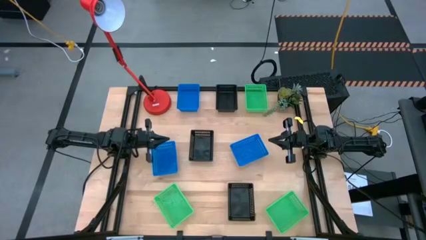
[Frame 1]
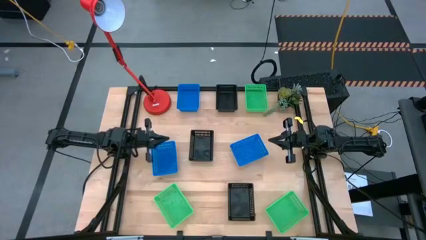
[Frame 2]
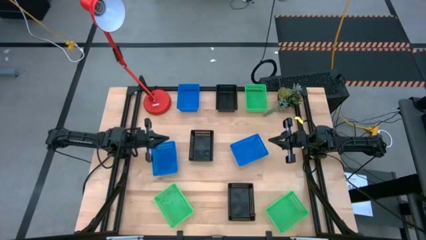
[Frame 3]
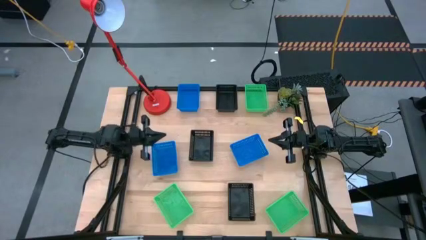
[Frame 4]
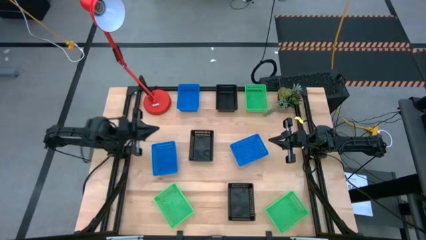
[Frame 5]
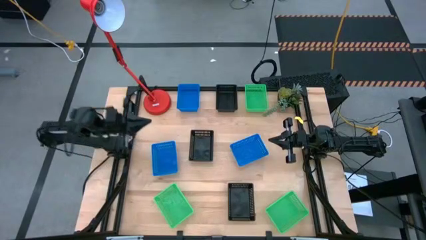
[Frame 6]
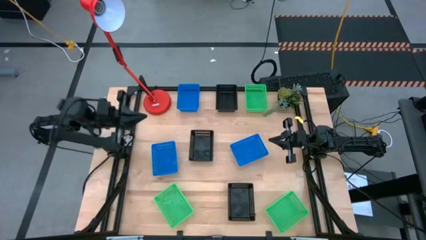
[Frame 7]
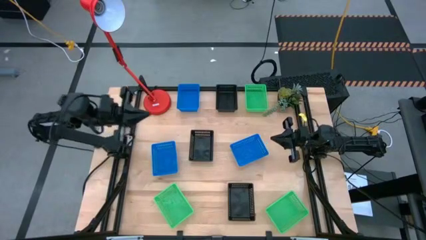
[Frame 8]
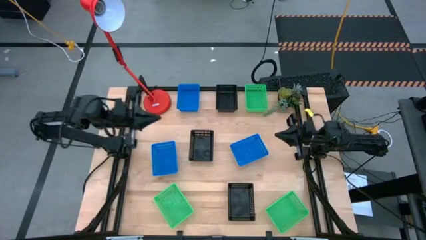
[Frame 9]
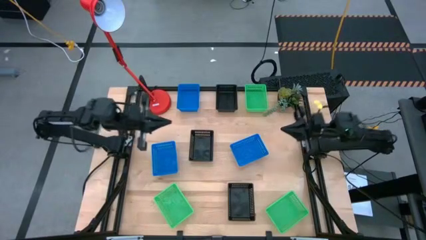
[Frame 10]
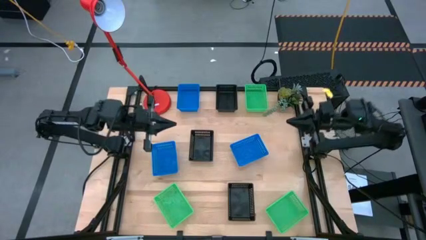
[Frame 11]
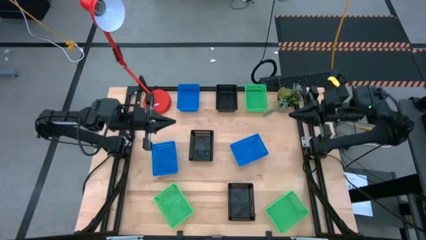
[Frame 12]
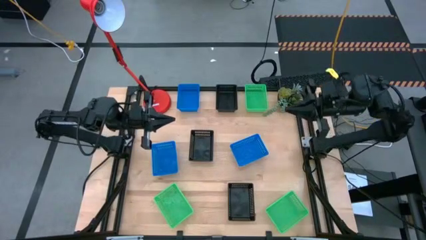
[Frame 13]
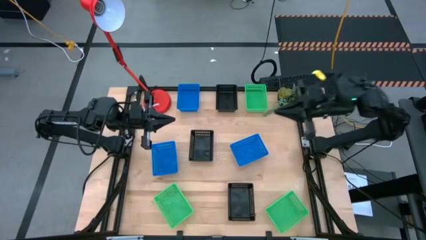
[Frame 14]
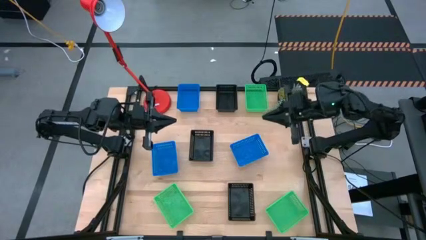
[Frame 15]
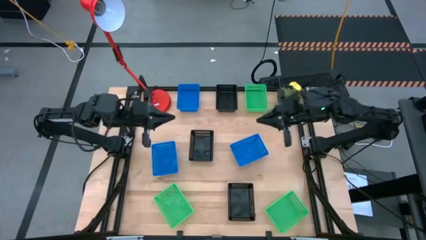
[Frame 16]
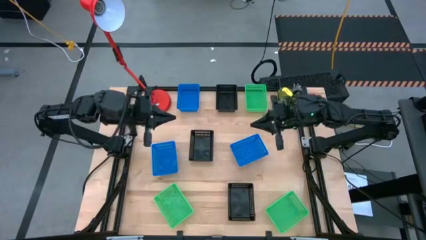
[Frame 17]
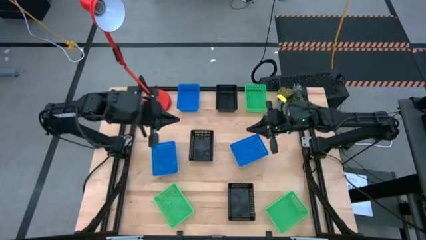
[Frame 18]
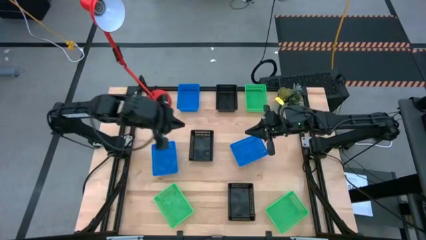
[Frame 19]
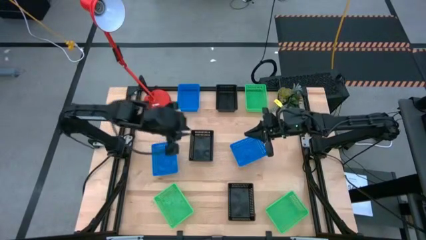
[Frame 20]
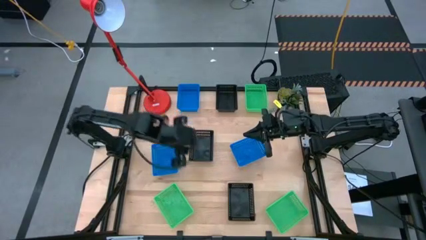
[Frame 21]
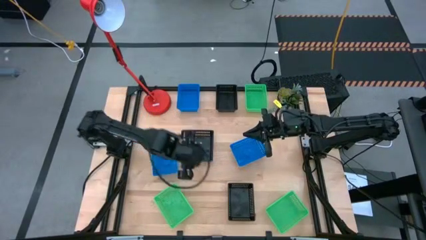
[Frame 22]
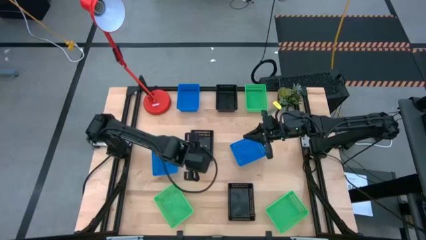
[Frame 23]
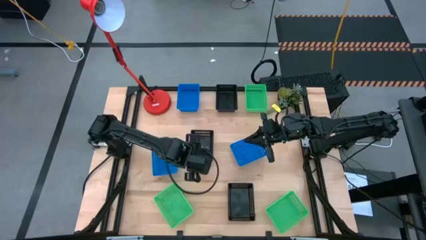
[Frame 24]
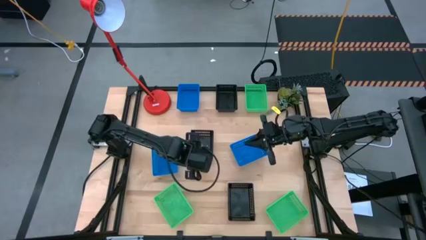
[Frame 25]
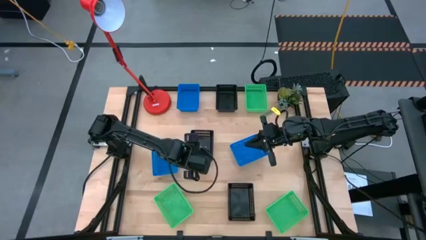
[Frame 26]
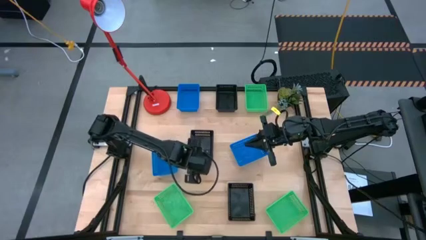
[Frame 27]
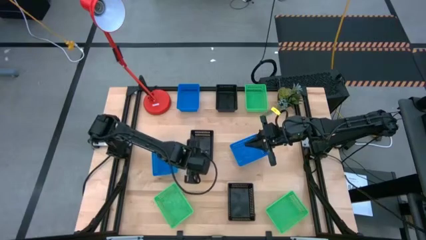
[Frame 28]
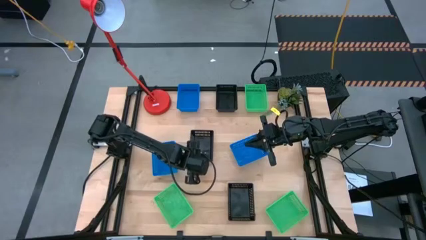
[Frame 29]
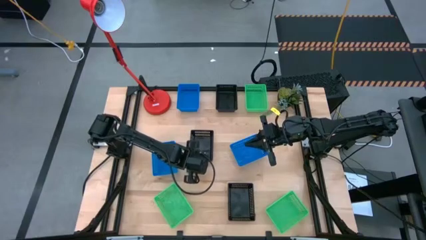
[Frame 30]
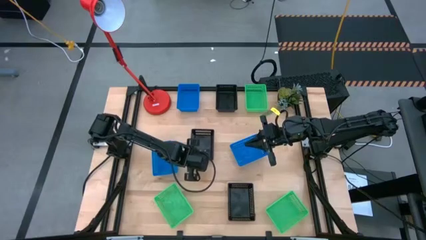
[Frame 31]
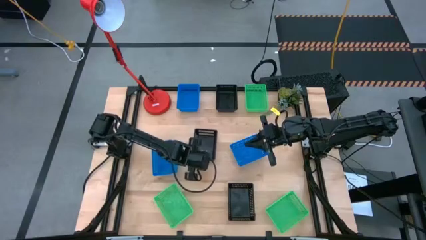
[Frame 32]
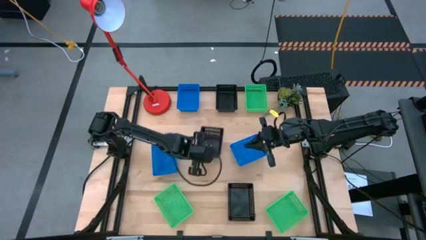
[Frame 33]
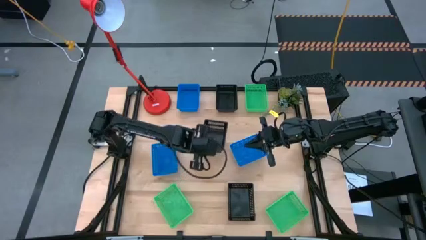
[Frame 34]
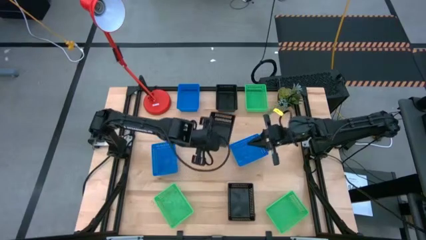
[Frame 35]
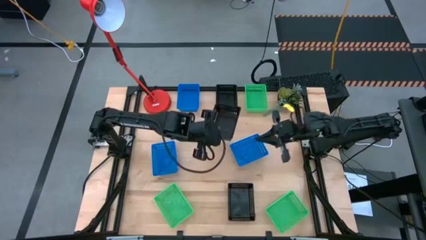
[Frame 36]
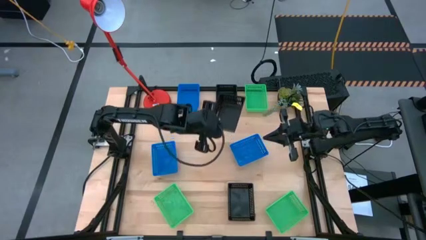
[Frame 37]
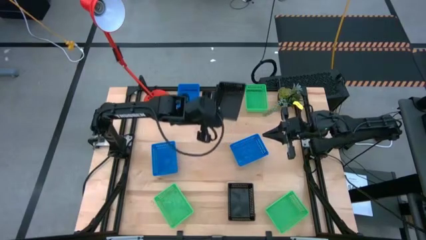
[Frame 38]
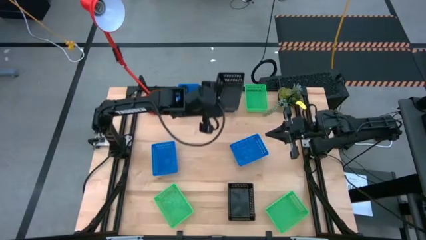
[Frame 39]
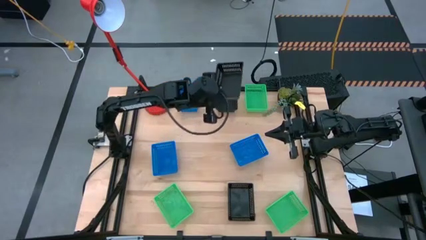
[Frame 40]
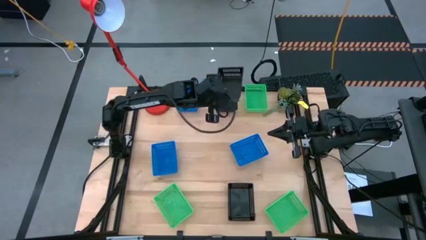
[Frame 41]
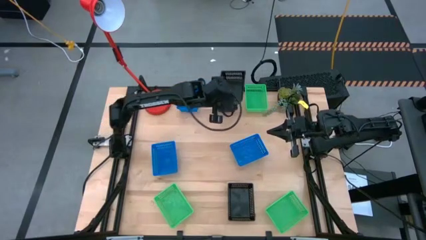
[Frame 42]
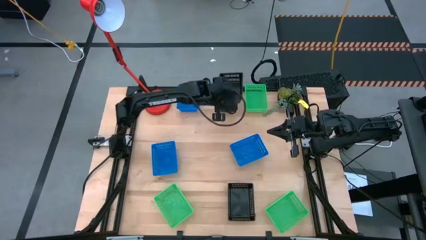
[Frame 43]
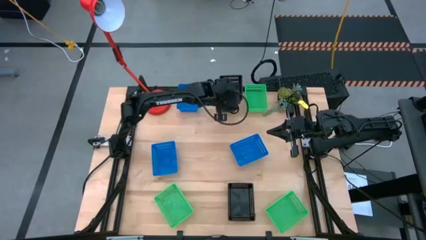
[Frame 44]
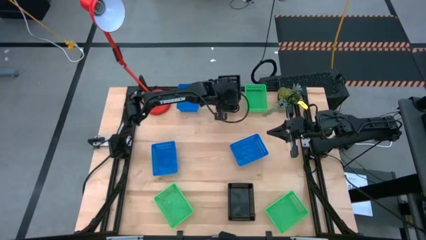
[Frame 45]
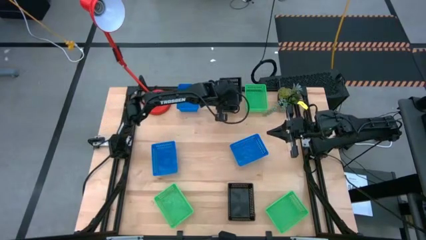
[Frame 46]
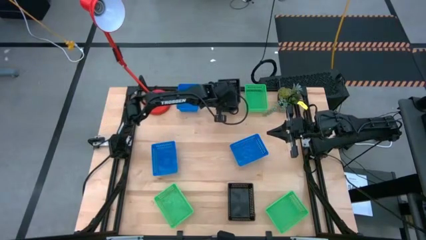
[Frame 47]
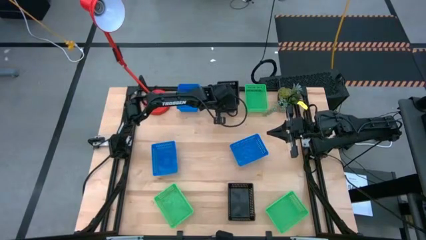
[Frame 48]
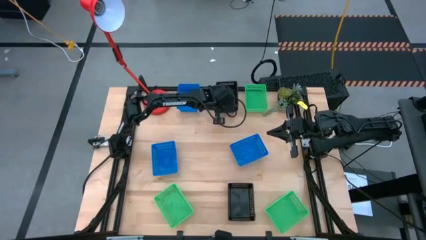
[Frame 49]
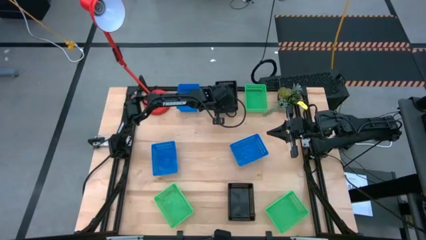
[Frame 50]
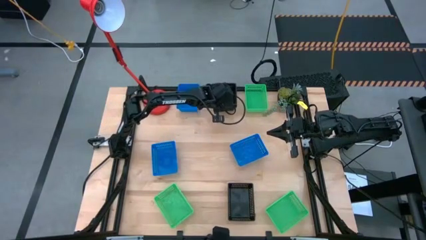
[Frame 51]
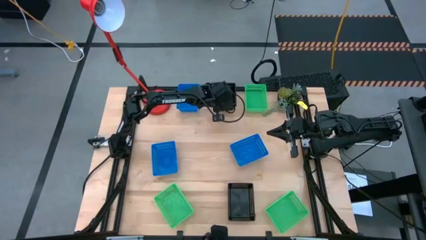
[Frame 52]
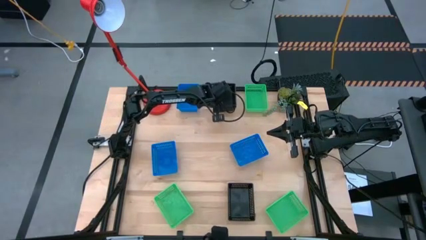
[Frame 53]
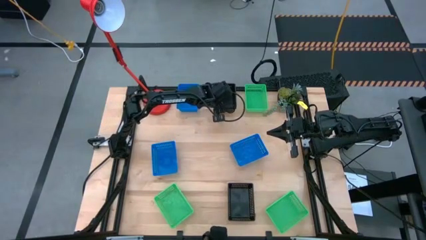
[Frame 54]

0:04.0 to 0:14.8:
Stack the middle black basket on top of the top black basket

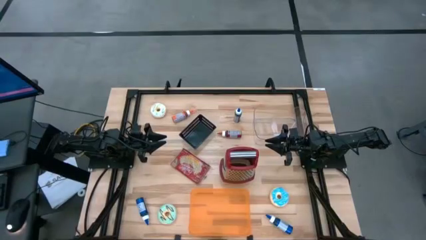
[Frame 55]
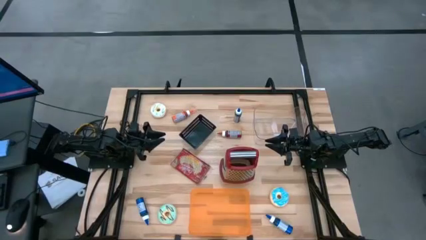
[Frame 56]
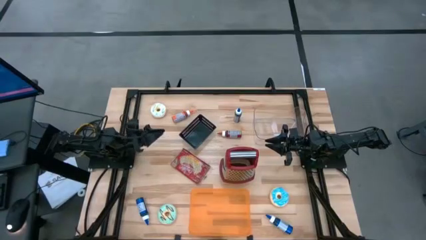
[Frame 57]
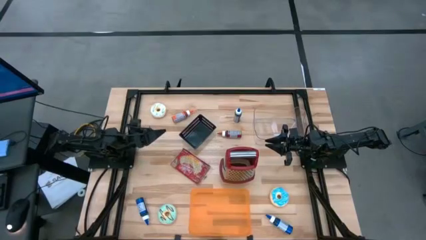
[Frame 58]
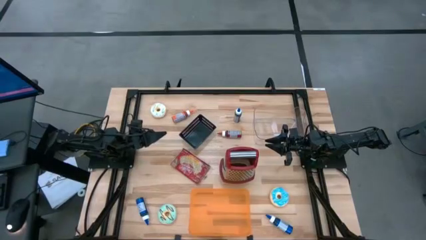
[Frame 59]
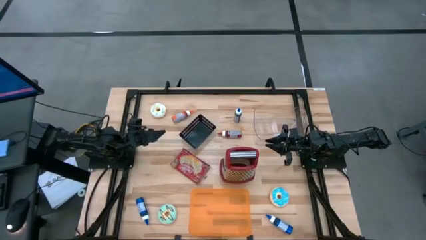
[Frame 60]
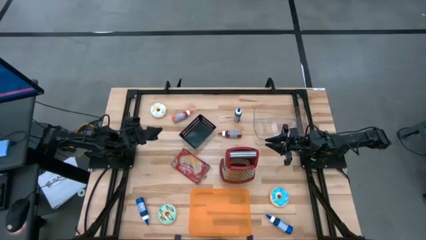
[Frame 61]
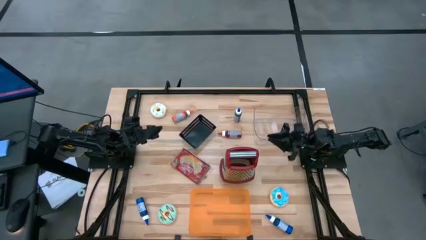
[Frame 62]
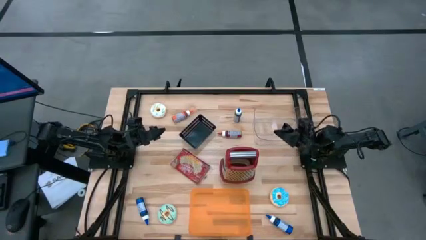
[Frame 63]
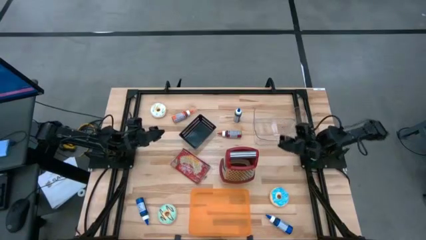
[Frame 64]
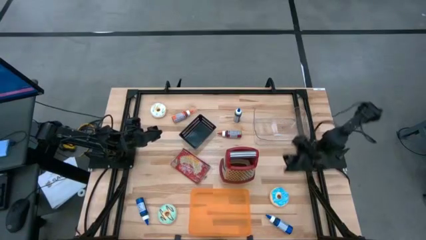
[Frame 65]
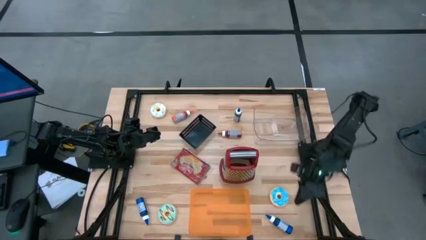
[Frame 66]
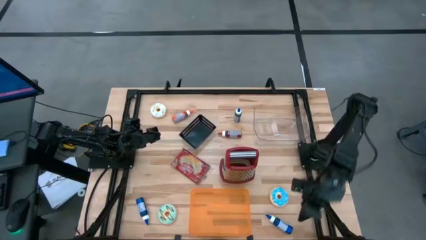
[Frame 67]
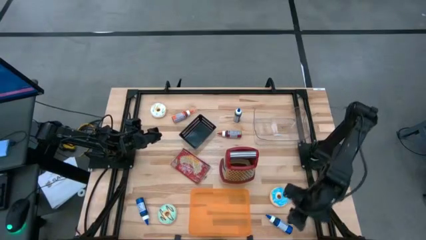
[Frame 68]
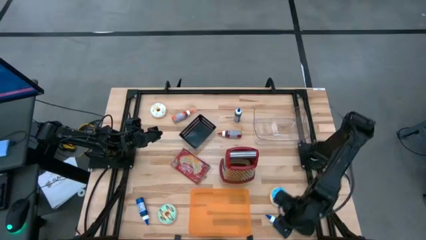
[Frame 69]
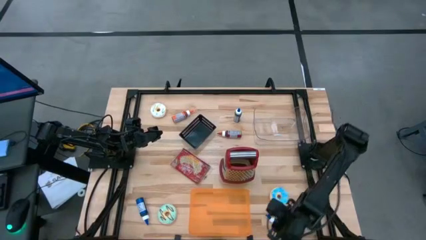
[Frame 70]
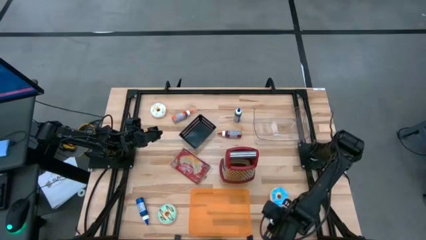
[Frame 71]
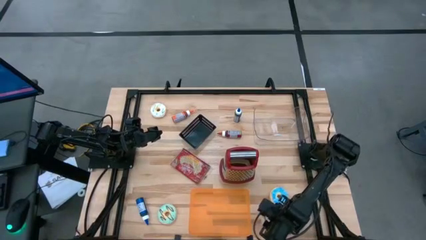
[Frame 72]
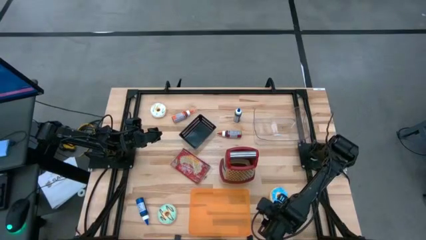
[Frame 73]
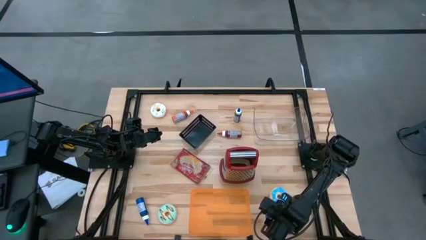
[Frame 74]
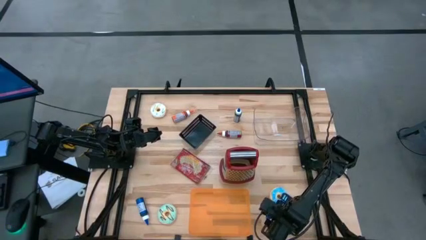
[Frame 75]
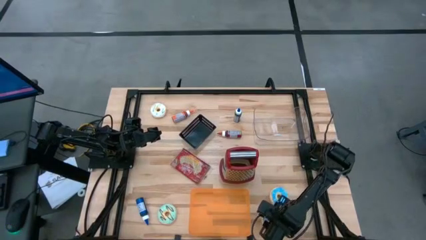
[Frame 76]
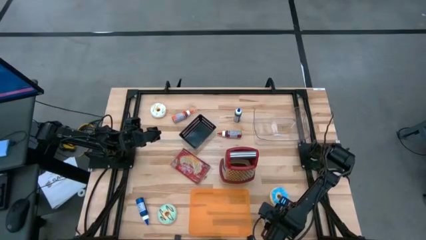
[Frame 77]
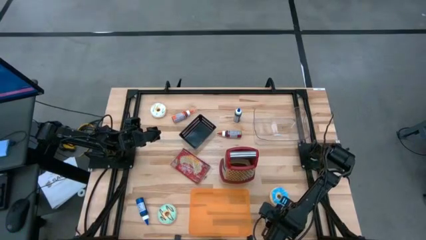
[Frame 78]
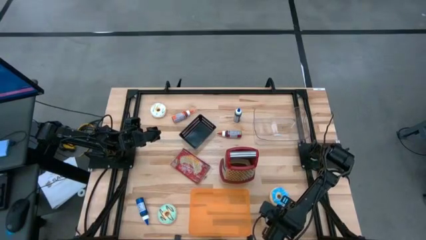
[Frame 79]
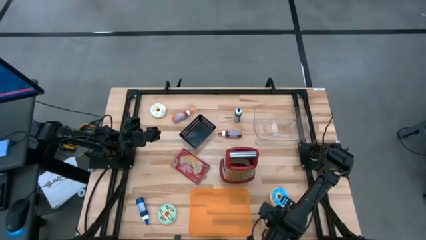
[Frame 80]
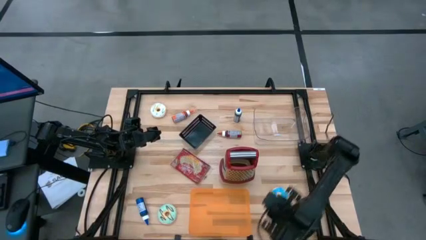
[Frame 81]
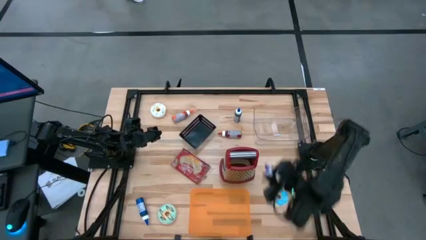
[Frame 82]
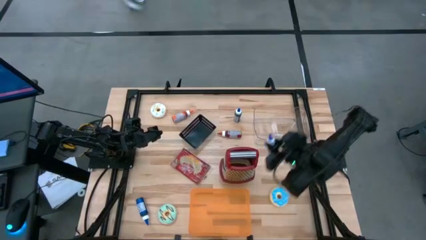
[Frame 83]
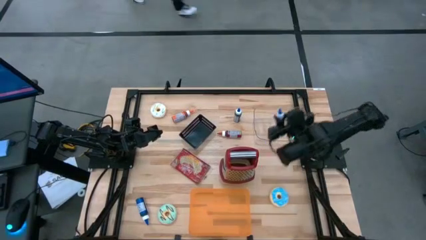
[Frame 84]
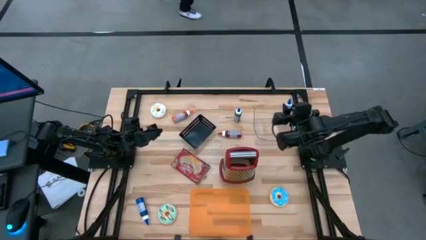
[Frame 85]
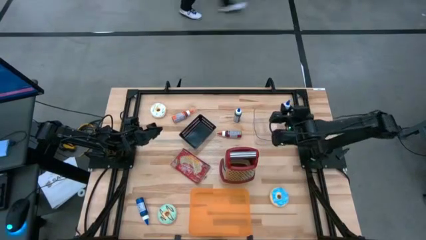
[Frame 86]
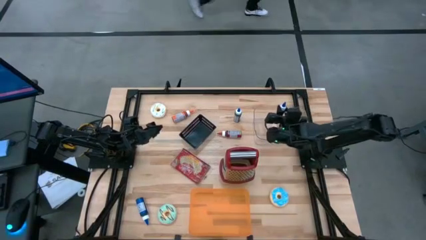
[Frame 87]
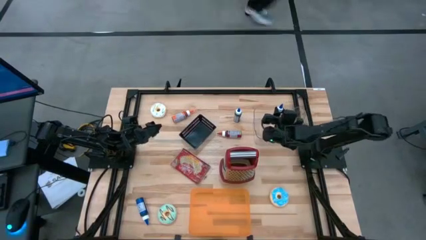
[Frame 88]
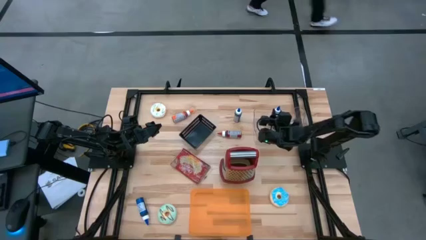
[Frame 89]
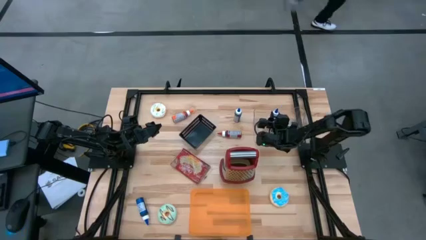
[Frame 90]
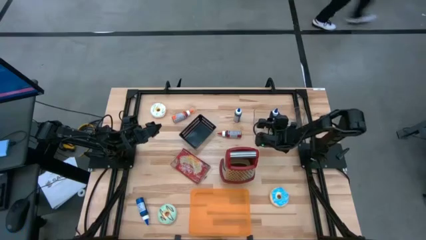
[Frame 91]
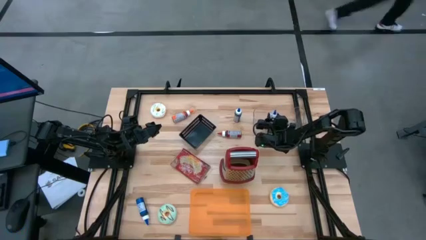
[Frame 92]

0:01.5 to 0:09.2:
Put the bottom right blue food coloring bottle into the transparent bin
